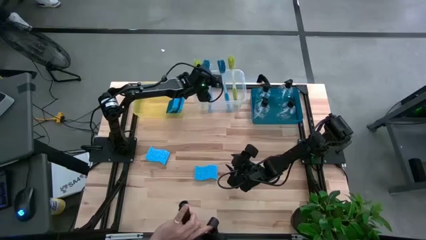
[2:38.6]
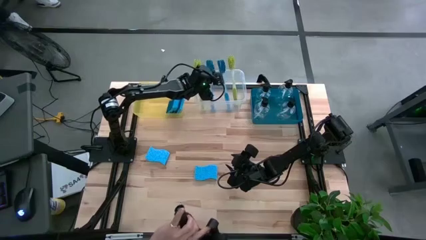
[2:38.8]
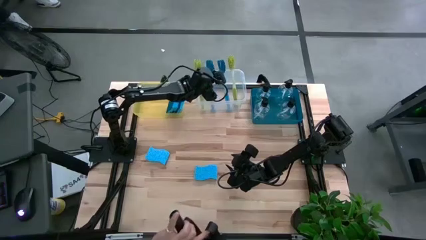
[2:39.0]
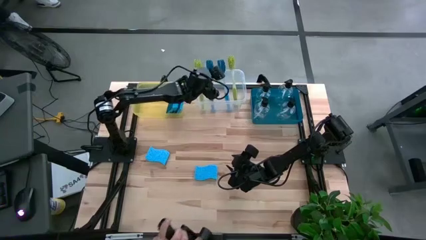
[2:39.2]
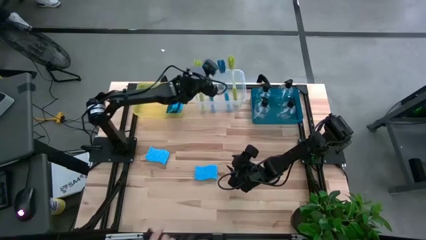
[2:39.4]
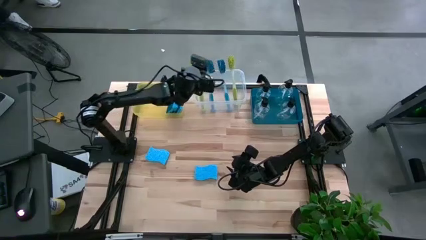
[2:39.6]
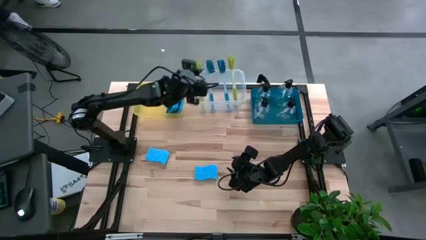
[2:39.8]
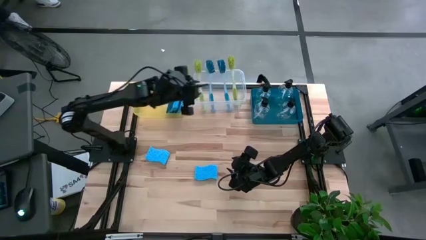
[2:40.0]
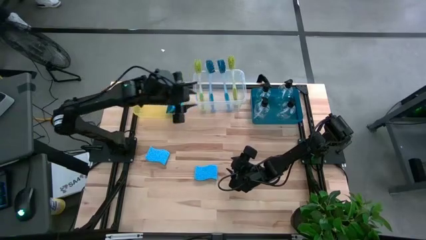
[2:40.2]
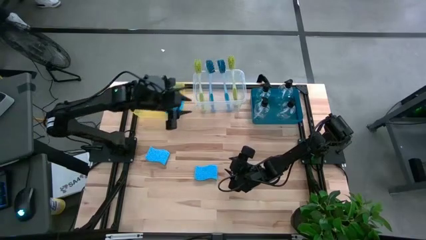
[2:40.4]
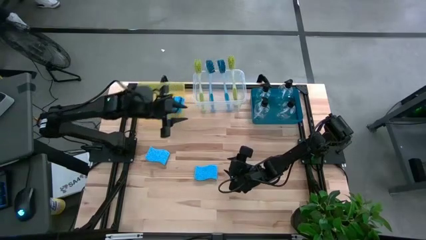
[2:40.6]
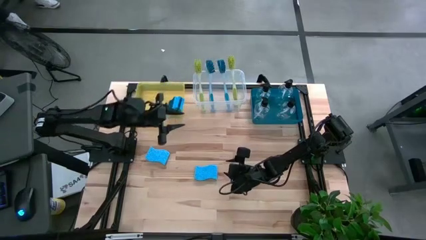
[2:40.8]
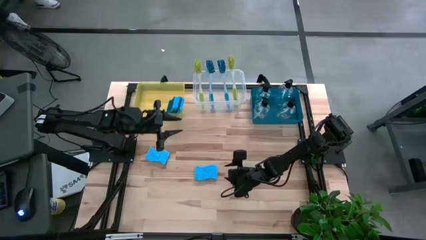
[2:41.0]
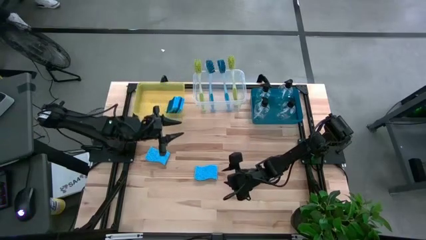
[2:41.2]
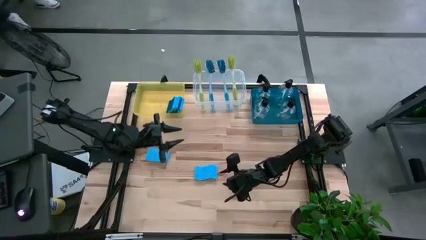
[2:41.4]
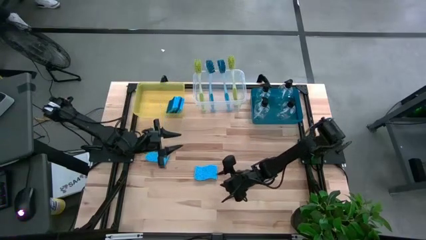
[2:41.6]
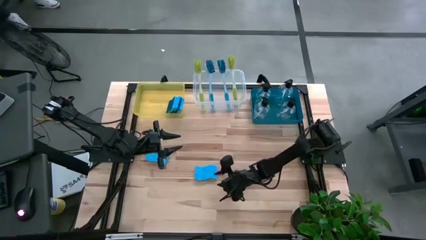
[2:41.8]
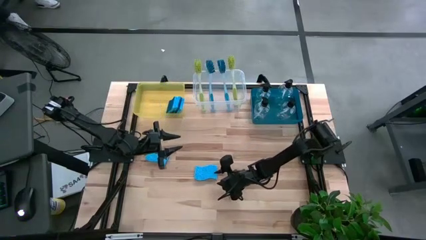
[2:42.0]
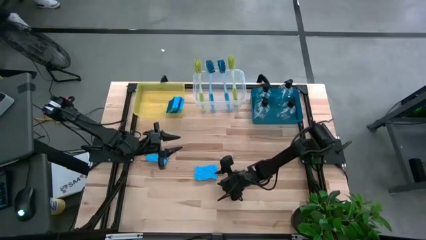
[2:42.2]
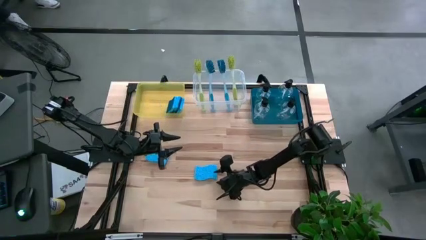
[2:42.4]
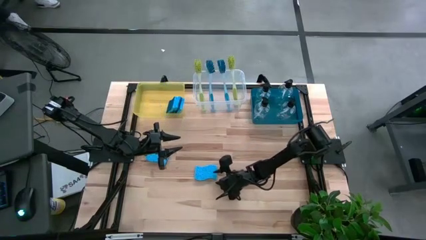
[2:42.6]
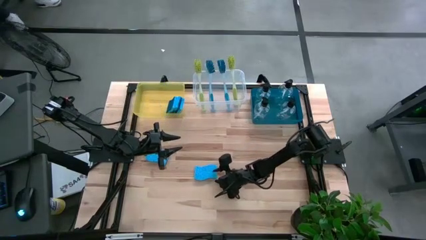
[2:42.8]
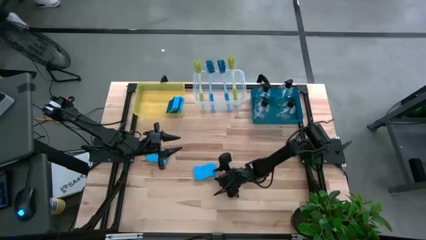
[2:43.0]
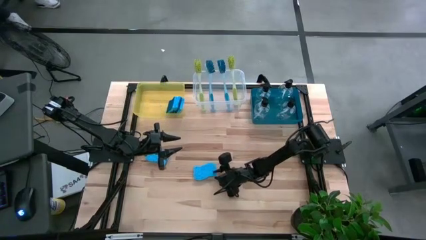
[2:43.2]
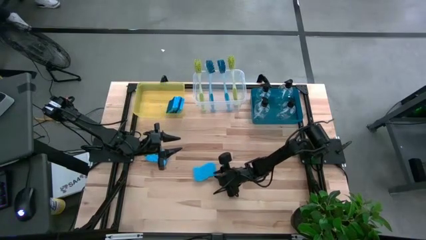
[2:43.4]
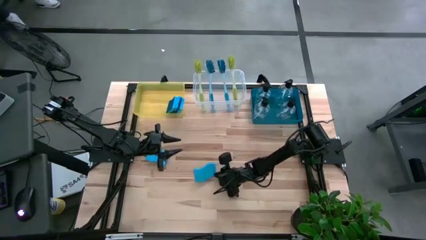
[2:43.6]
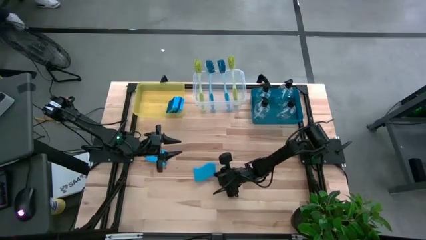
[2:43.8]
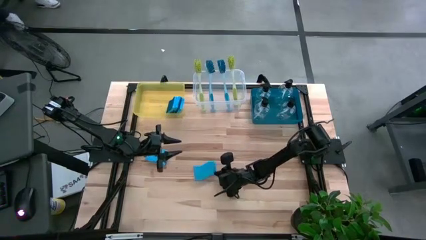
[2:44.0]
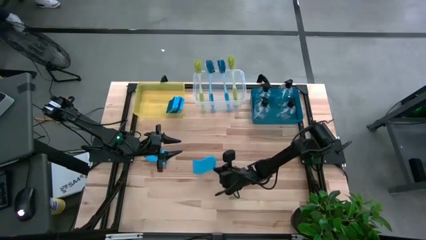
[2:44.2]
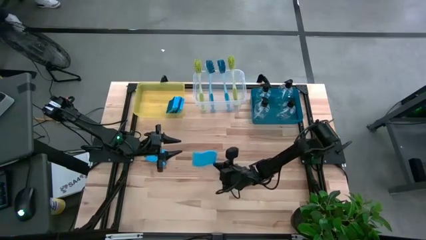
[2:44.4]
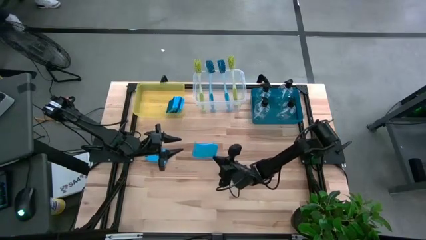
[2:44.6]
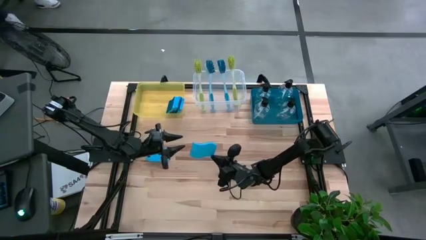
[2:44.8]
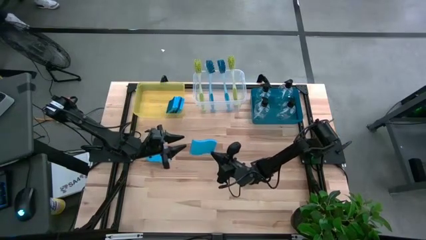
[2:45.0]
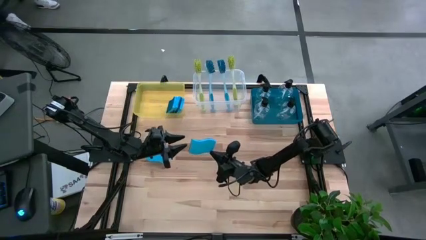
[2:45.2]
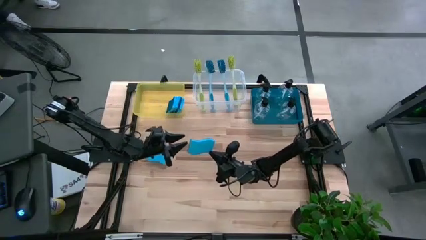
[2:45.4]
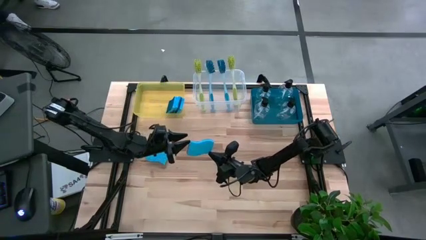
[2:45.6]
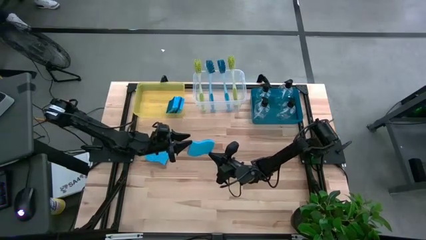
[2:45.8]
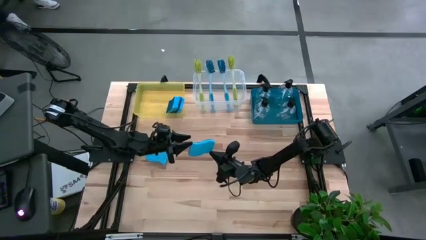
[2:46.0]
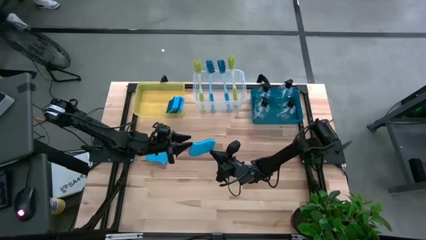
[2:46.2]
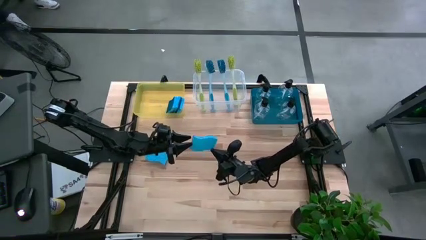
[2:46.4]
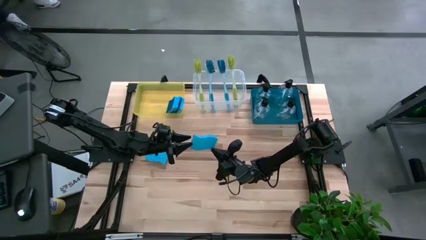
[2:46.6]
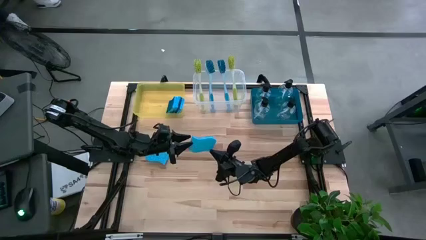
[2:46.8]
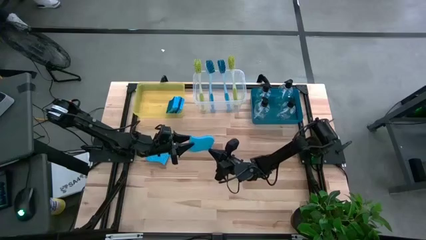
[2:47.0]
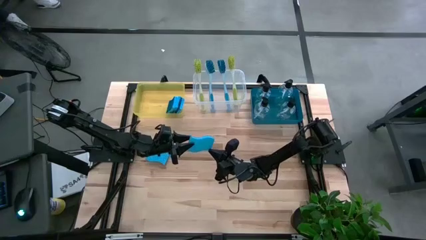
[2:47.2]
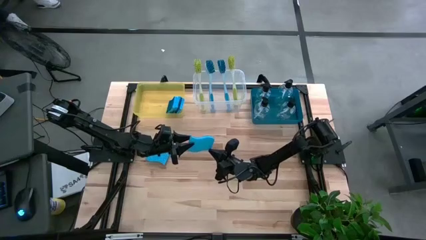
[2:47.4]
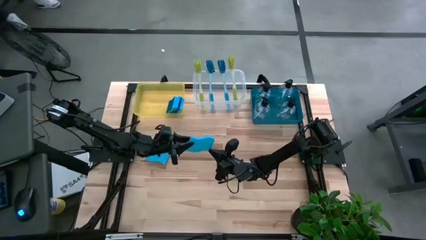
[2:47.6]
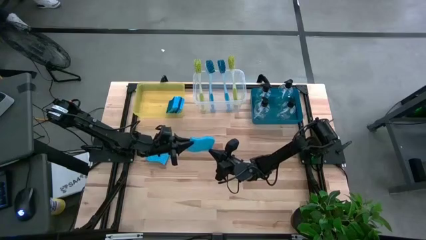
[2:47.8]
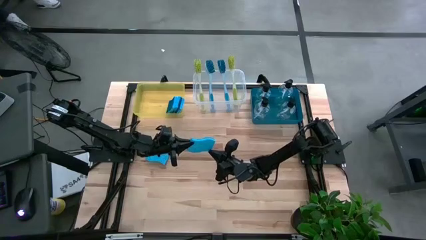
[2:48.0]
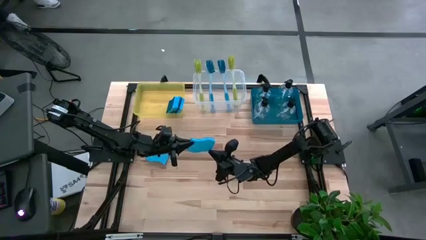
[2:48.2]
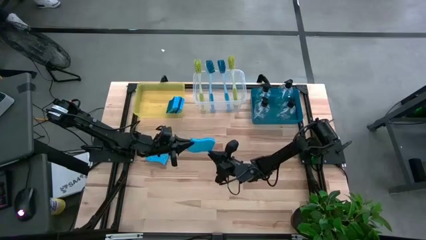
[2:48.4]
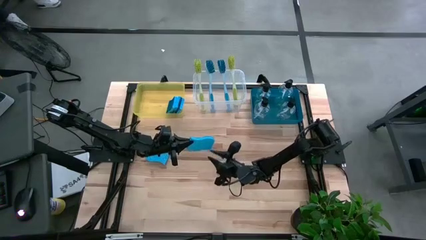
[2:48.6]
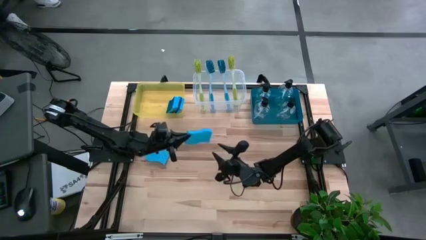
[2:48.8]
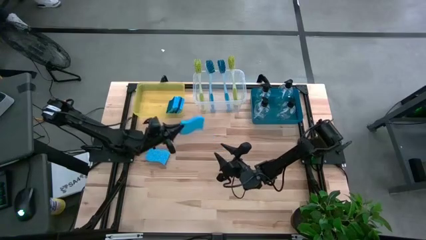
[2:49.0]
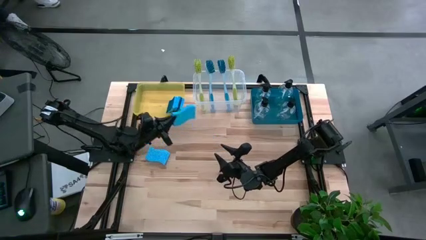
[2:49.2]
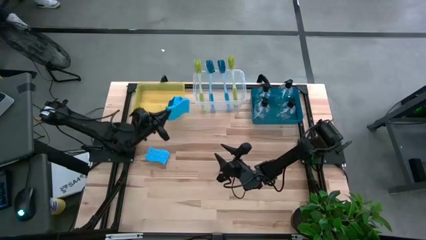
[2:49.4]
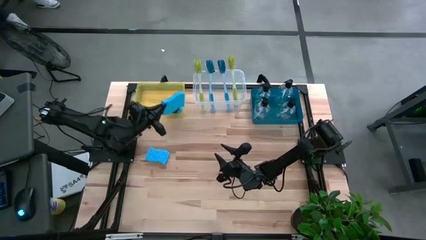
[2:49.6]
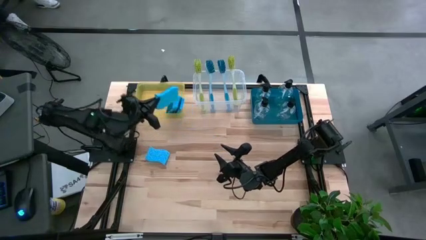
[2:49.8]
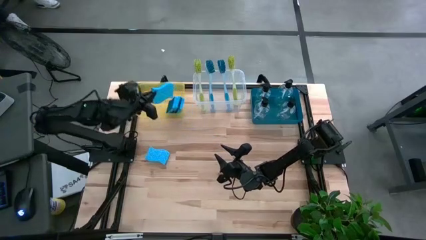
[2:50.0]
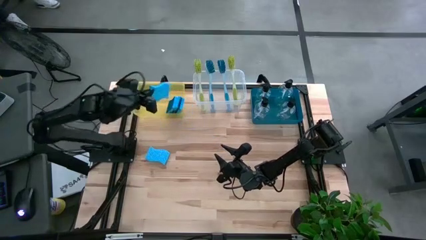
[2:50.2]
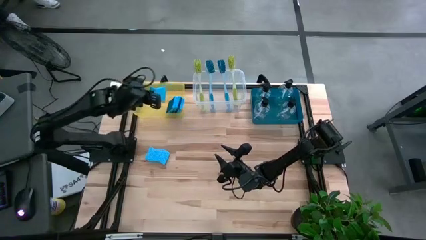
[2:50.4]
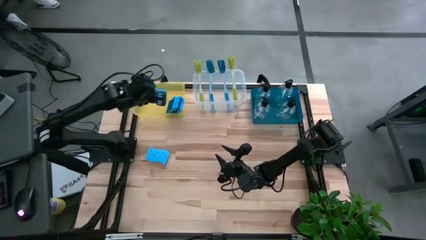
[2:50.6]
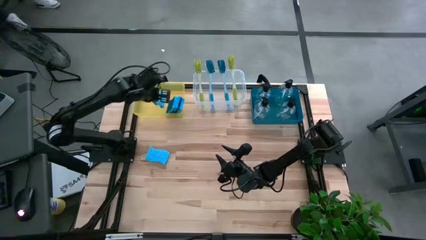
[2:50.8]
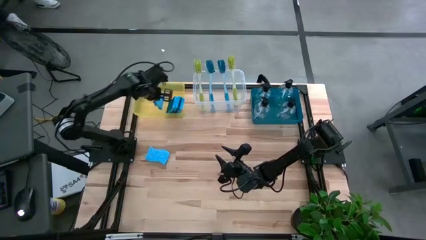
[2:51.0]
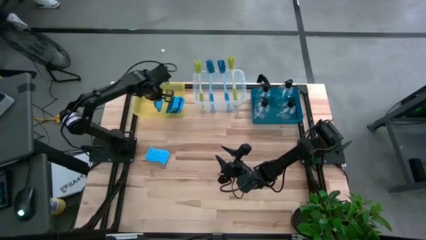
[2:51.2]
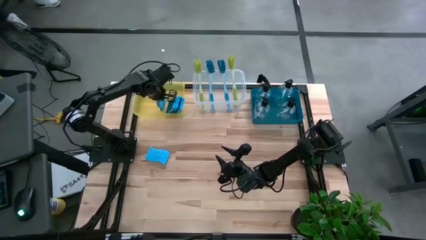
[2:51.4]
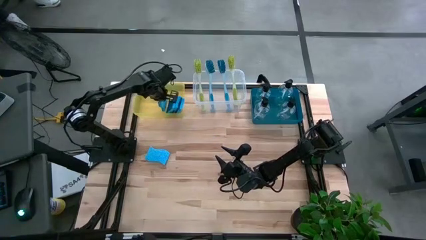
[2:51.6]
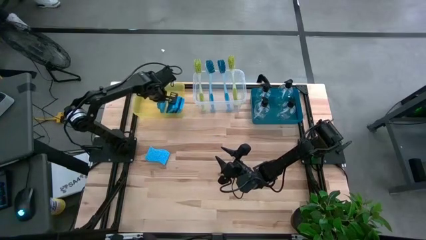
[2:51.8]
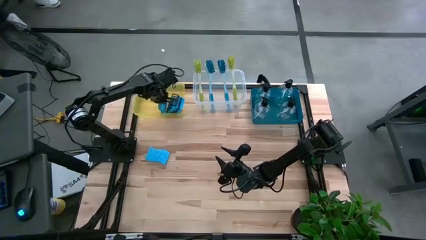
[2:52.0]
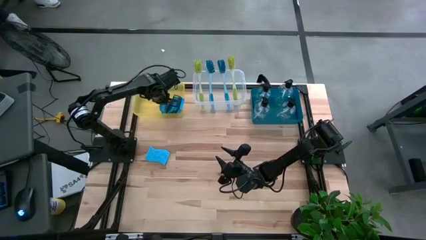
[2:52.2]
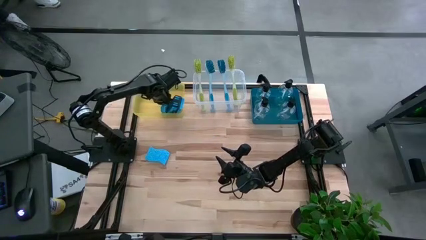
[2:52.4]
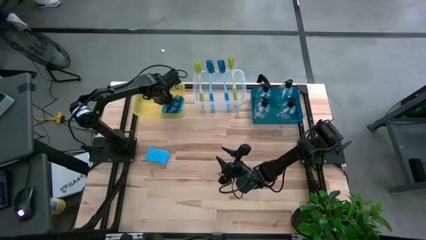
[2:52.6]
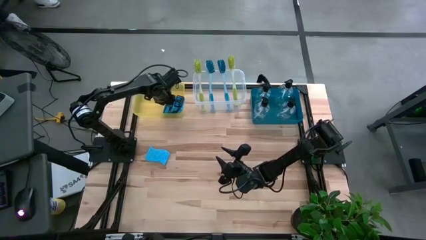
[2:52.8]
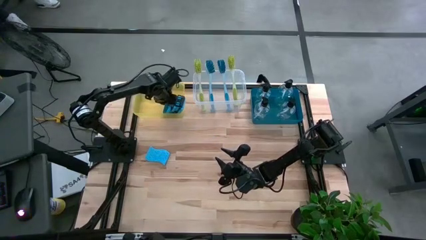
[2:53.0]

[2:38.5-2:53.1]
Task: Pick & Place Kitchen Sink Supplies
Put the blue sponge into the yellow bin

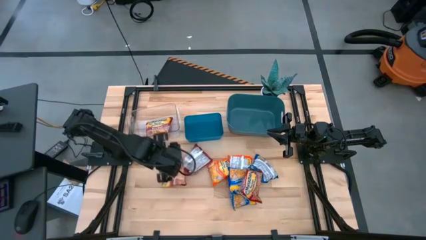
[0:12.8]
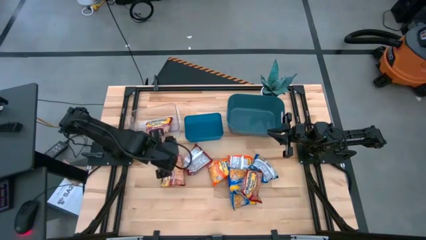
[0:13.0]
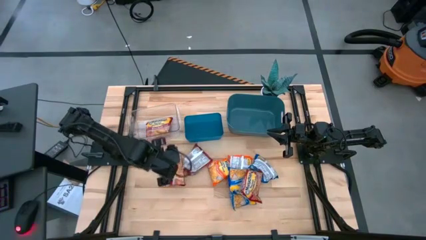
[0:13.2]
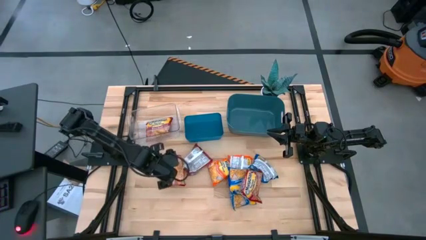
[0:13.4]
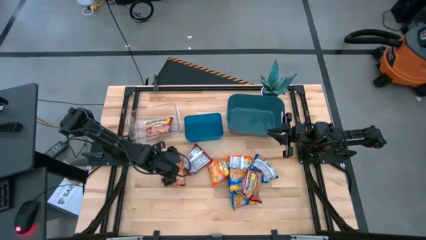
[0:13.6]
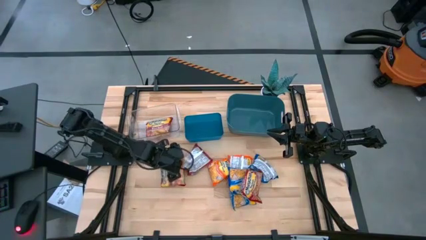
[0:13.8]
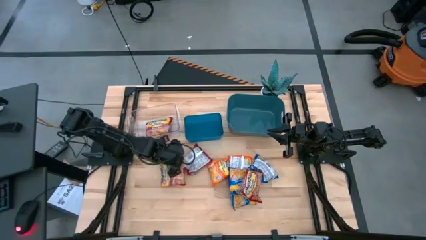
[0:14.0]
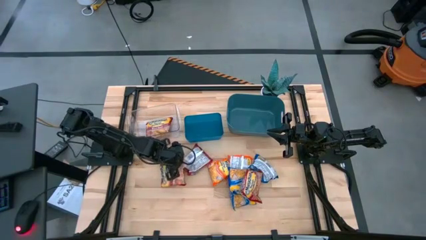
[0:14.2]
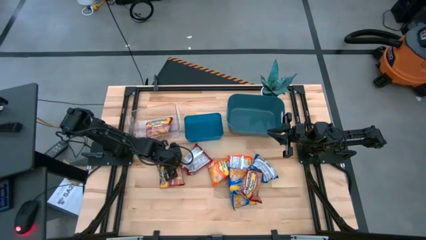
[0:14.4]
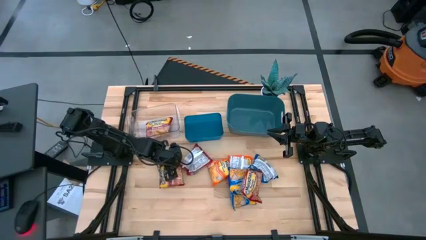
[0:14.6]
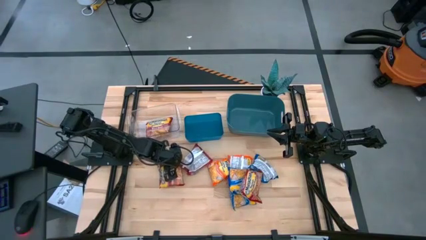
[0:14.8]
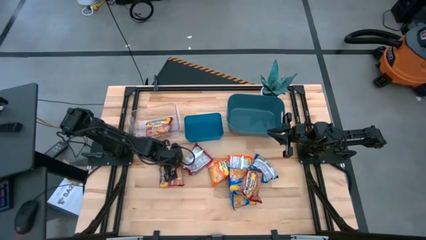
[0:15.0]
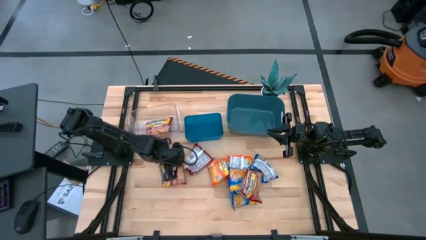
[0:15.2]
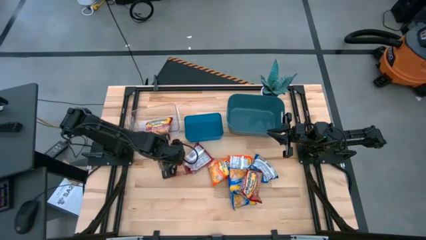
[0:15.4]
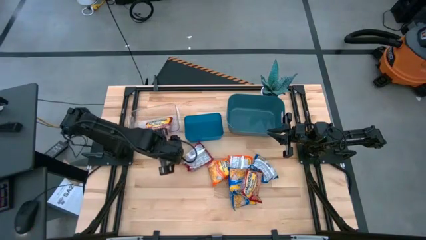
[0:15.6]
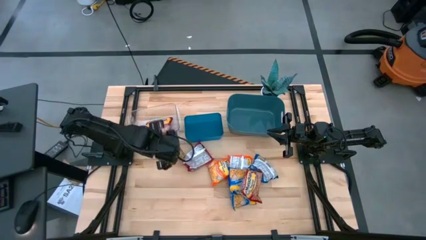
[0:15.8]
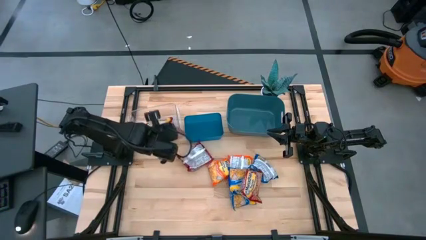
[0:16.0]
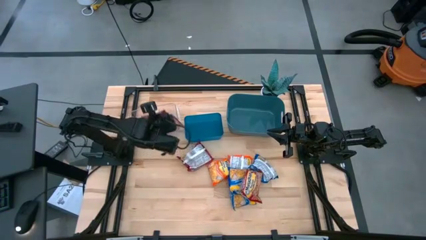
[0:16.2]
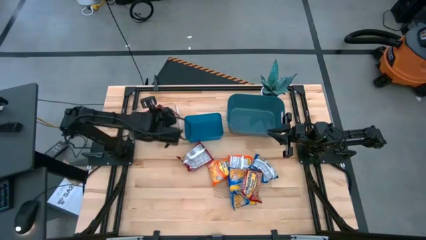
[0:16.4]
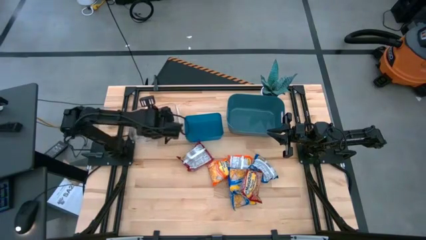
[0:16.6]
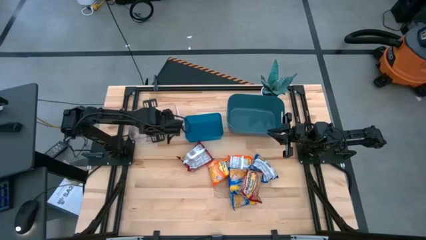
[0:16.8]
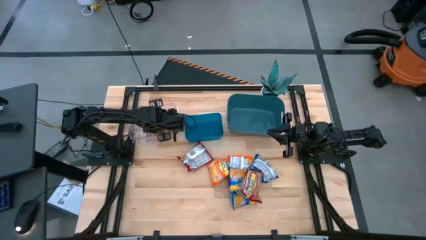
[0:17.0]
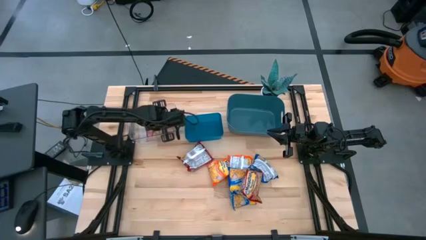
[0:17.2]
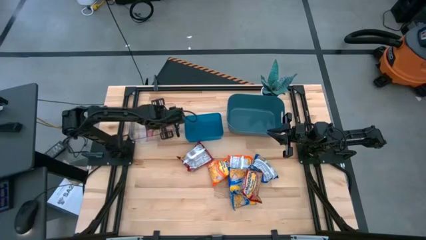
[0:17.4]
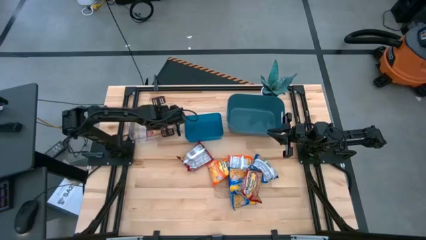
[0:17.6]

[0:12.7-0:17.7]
Task: Sort Maruchan noodles
Put the red noodle pack into the transparent bin
